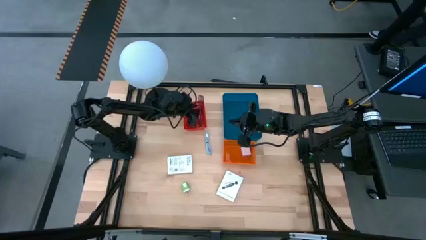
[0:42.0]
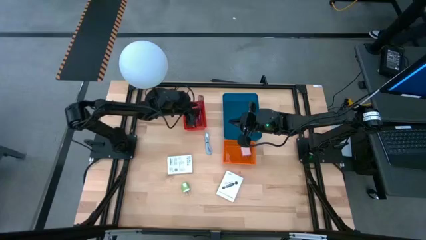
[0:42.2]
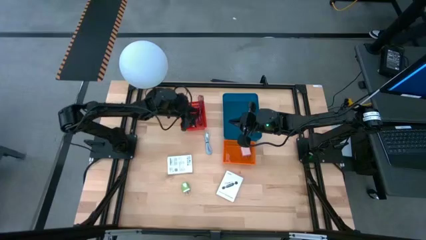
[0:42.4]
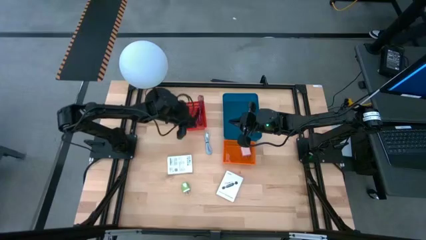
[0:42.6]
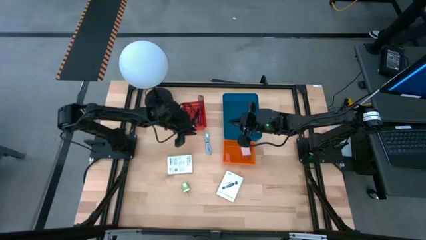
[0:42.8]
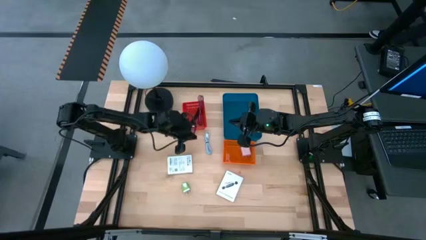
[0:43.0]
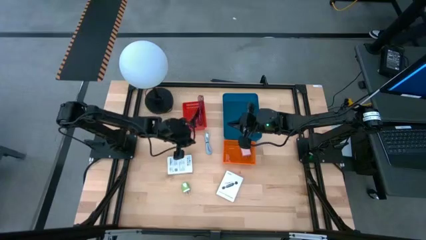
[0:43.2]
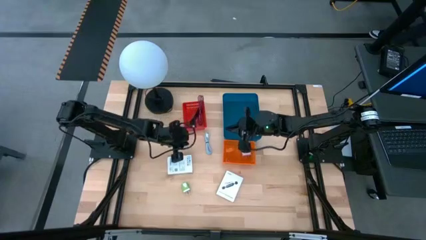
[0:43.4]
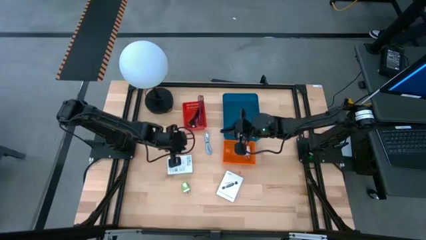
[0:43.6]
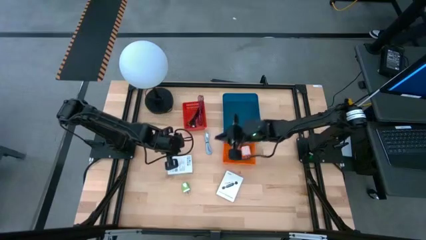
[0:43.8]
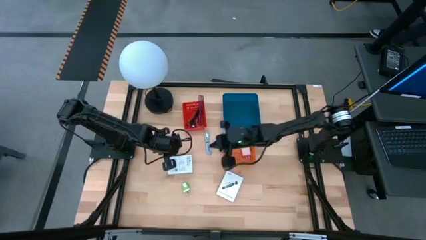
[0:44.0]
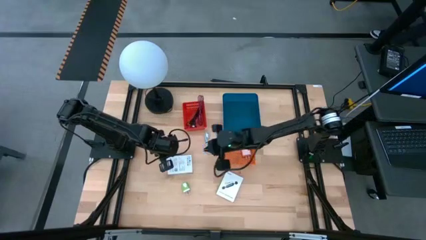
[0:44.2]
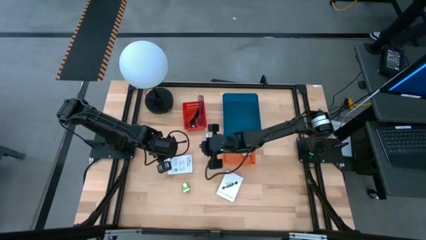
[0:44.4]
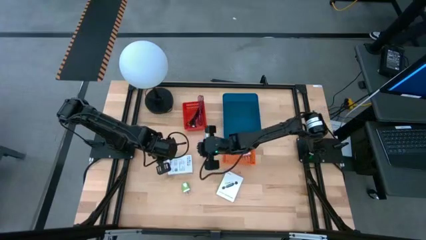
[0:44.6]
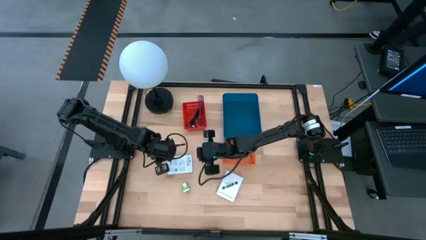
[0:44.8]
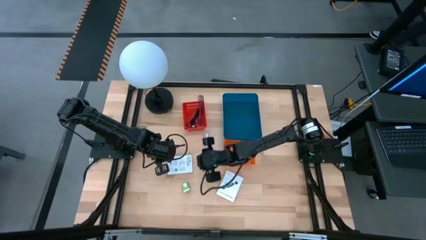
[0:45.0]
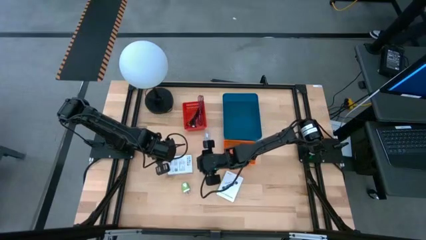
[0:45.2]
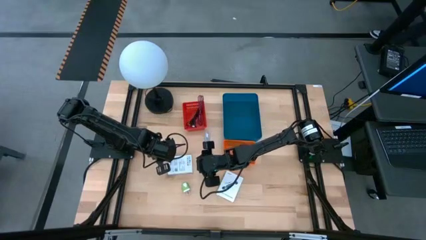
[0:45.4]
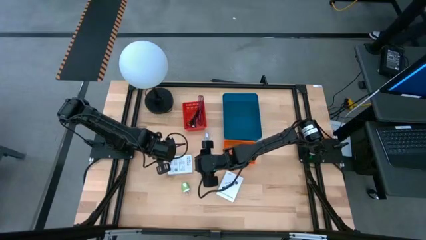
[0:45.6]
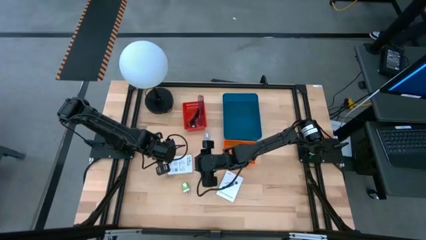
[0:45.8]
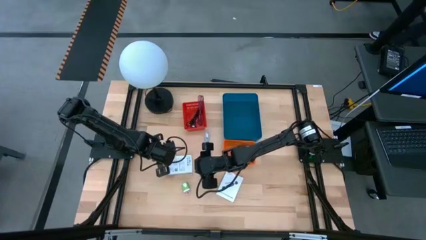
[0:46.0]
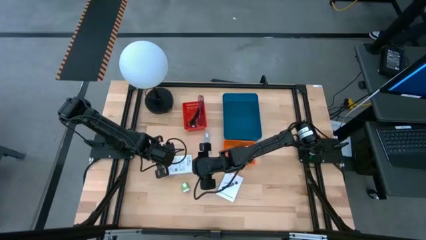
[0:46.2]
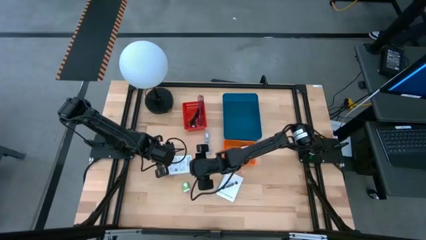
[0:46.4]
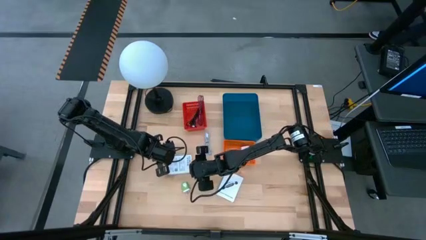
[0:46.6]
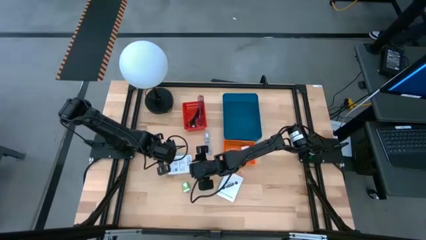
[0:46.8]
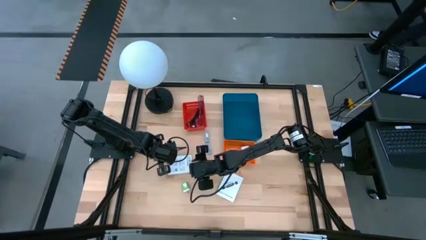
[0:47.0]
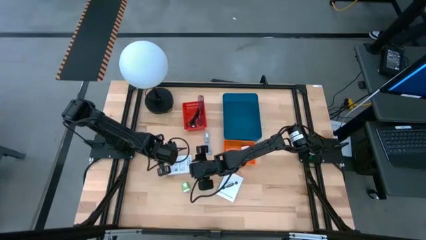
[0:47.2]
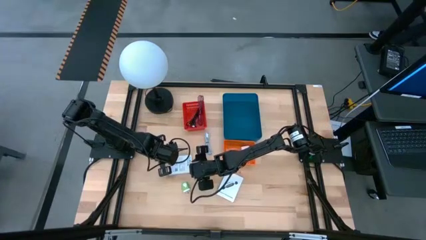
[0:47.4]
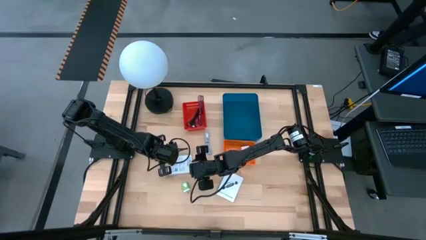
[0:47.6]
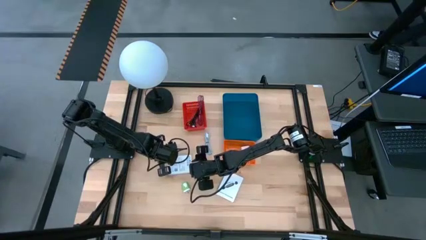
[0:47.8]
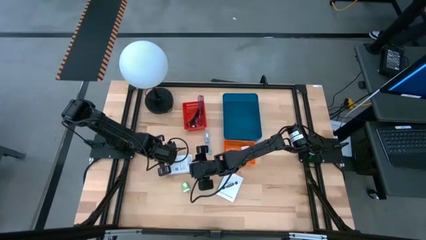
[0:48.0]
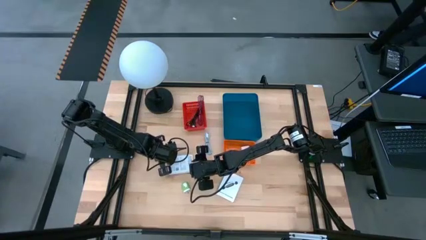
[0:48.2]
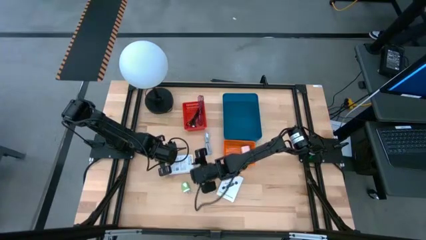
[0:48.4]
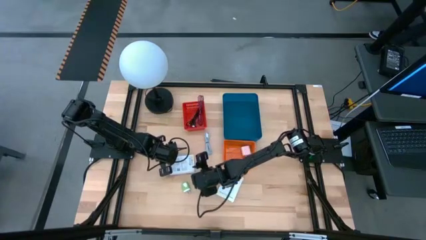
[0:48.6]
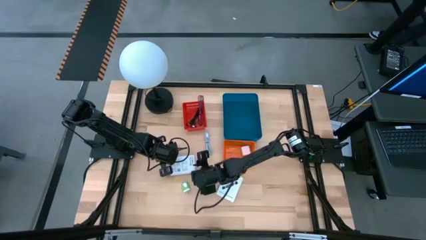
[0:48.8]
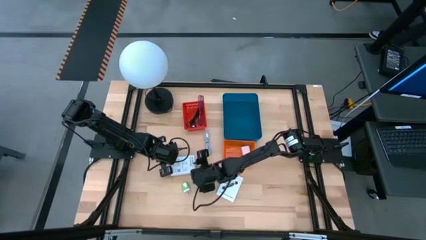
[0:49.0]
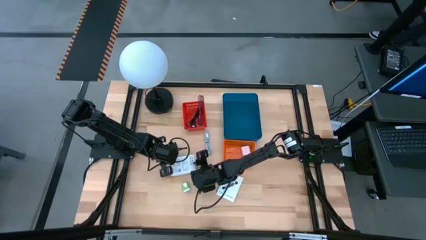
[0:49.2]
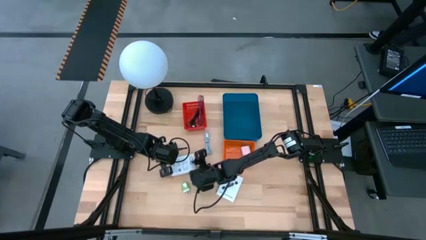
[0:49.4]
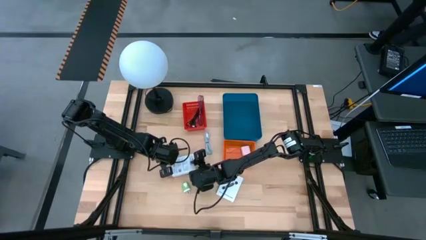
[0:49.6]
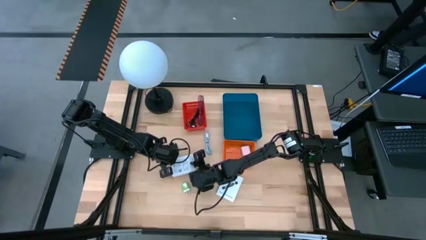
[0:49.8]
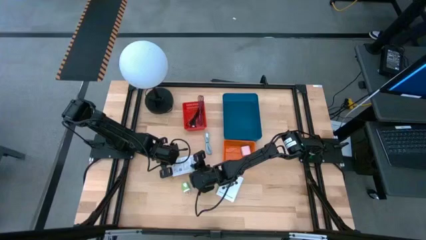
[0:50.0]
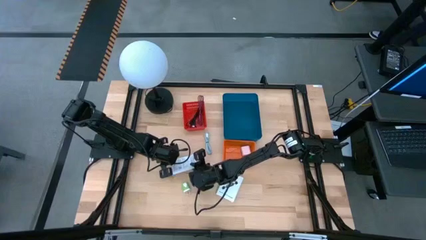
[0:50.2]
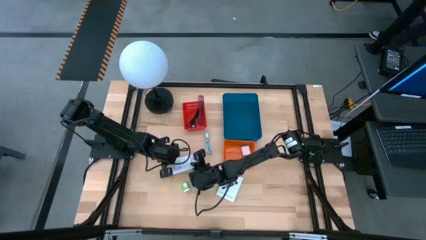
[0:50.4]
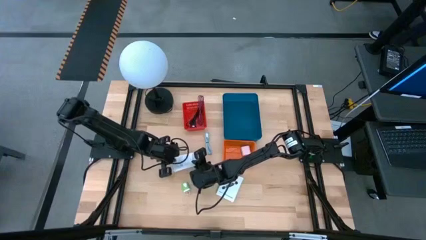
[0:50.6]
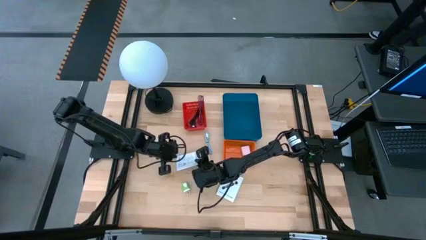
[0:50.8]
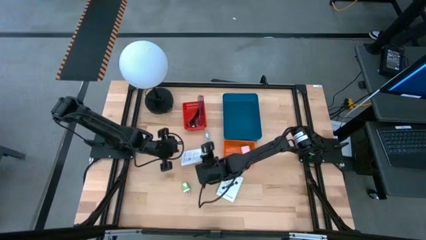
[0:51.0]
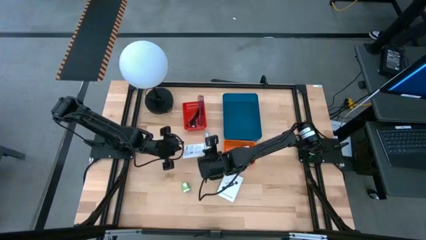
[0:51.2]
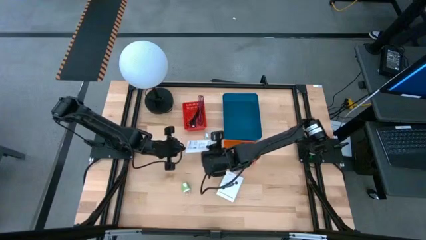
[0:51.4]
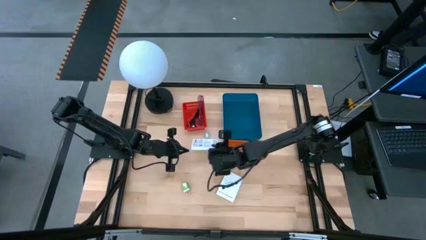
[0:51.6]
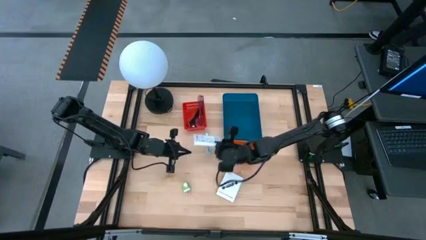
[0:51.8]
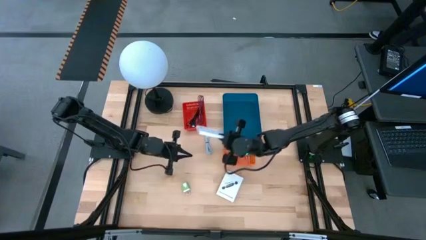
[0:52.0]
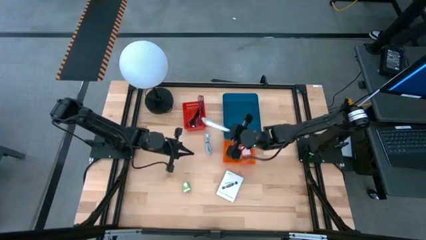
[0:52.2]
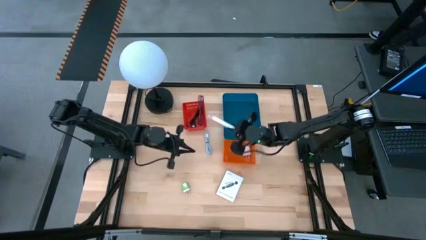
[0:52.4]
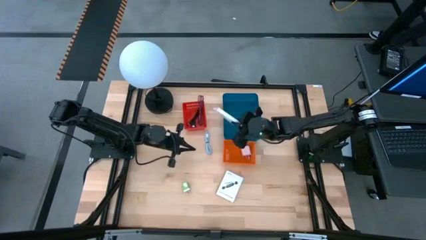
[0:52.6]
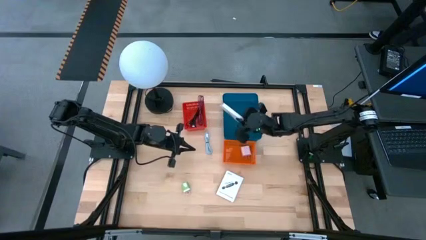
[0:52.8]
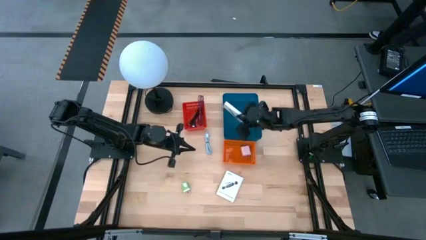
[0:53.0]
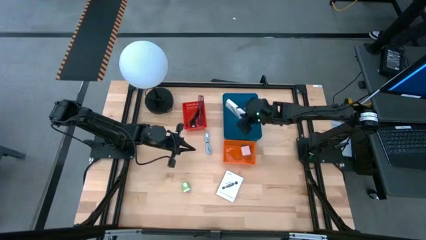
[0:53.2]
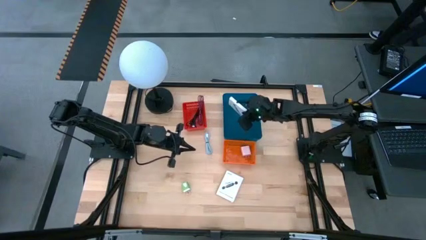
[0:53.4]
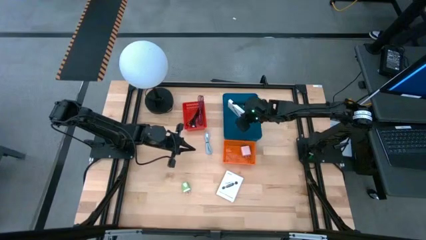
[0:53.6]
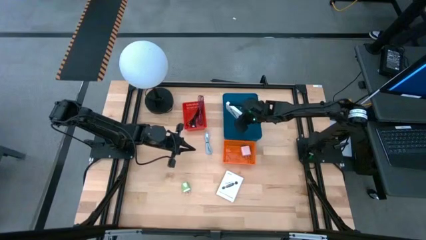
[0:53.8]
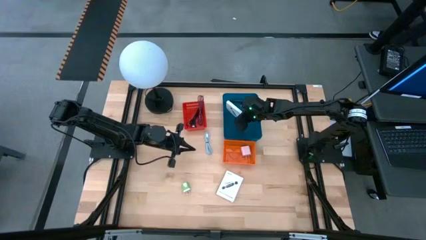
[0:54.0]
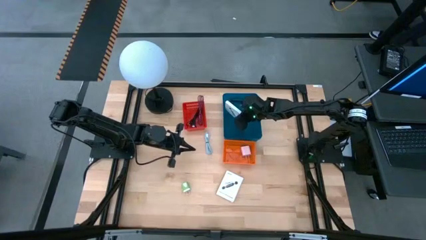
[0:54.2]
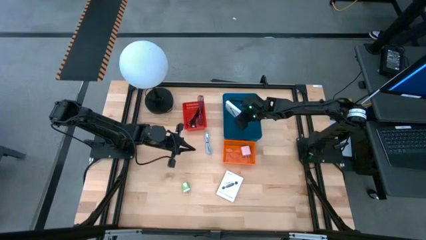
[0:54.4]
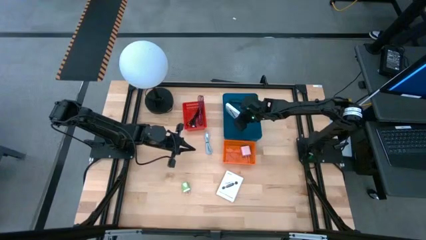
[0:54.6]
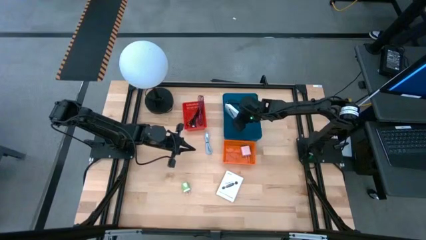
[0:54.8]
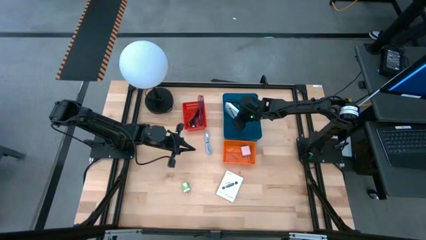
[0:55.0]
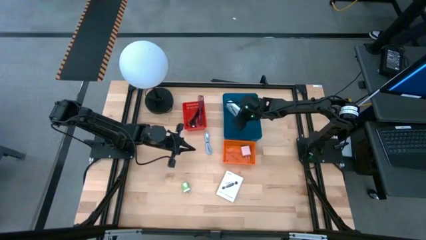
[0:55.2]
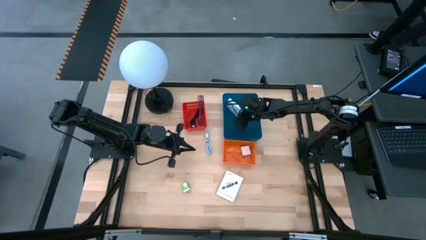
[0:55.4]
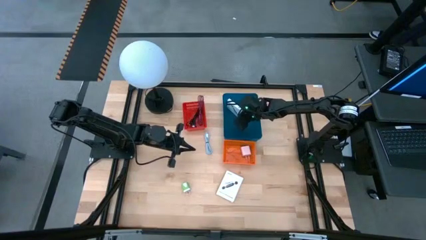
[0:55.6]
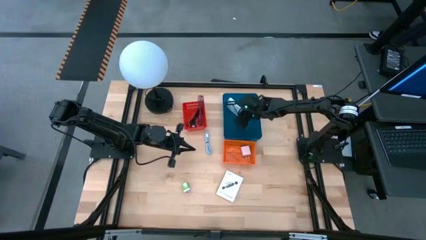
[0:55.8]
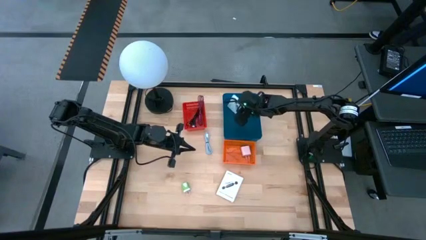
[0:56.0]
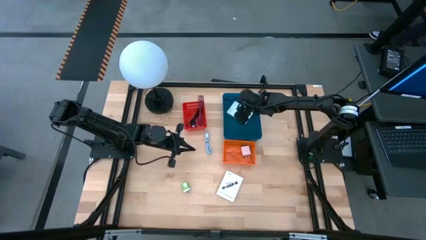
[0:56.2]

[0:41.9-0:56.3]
Task: Pick and place items into bin
Put the left white card reader box into the blue bin
